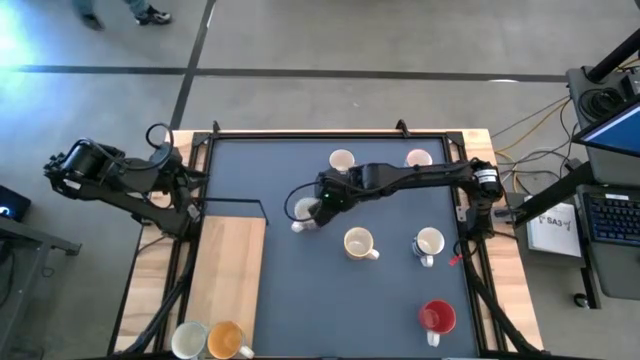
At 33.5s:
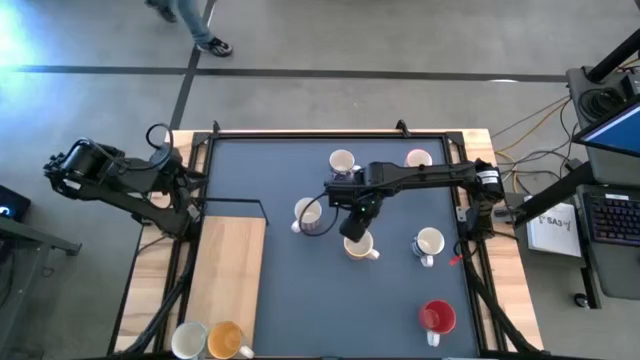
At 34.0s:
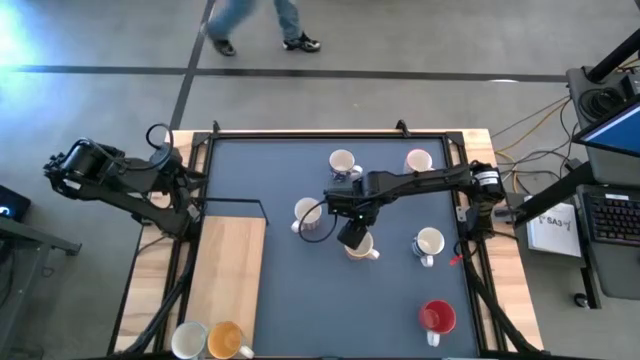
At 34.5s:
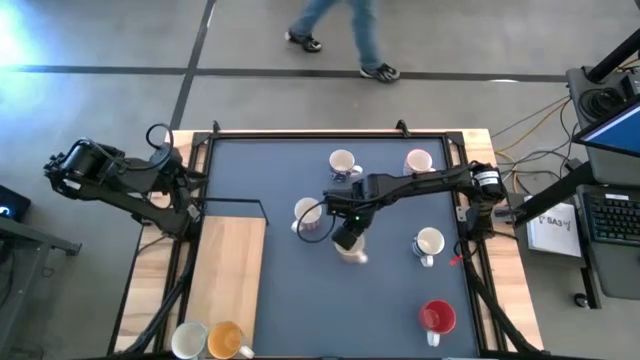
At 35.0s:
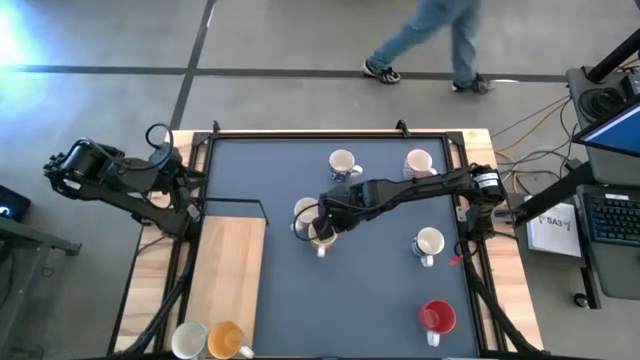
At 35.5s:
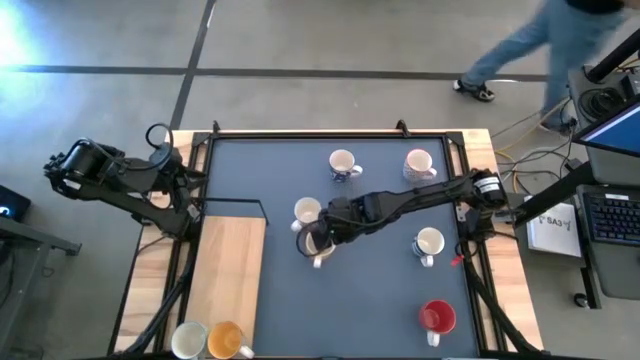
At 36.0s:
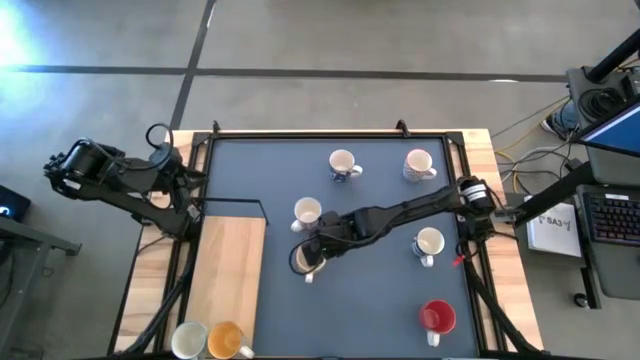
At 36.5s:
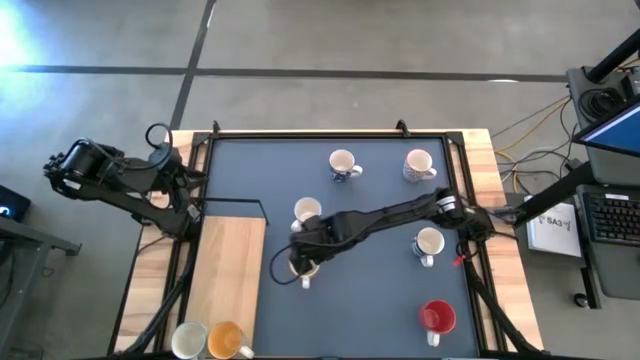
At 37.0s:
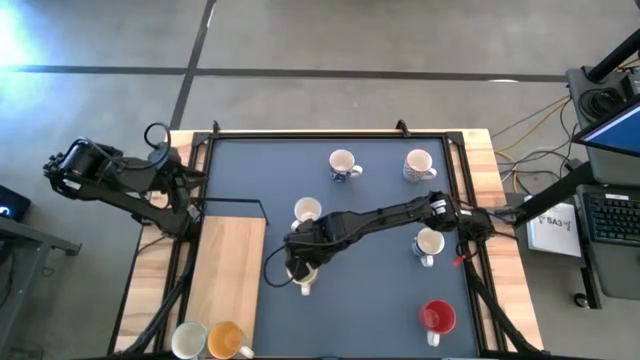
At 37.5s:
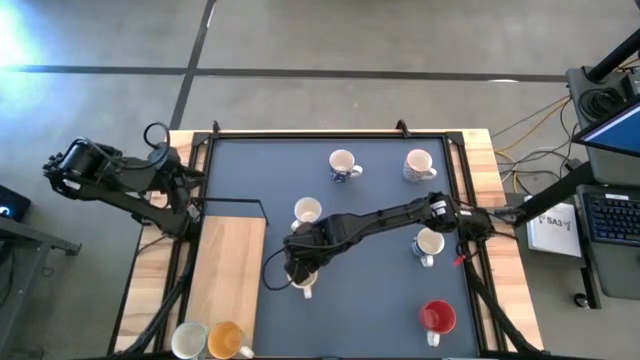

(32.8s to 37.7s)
Task: Place coffee mugs
Adjust the patterned brown mug

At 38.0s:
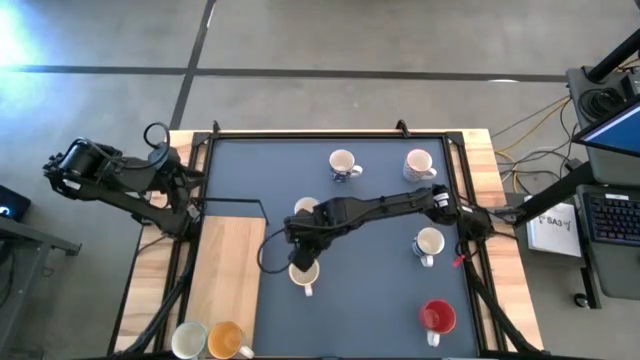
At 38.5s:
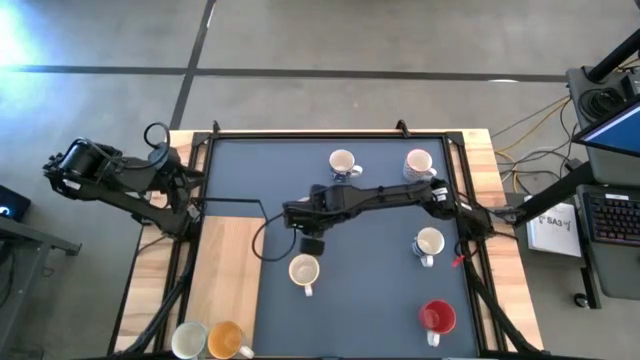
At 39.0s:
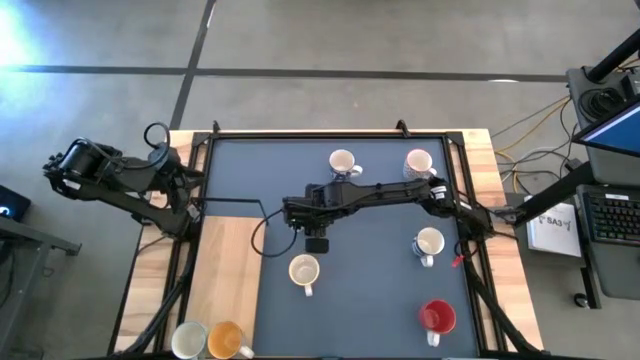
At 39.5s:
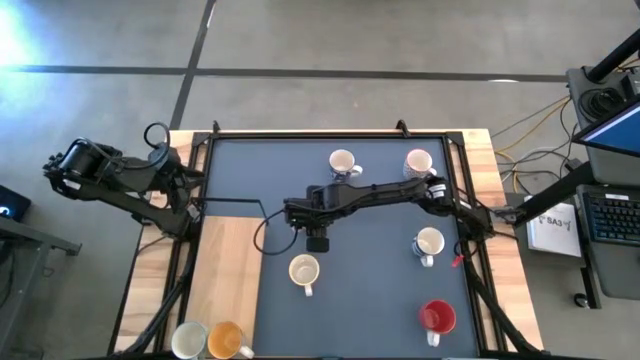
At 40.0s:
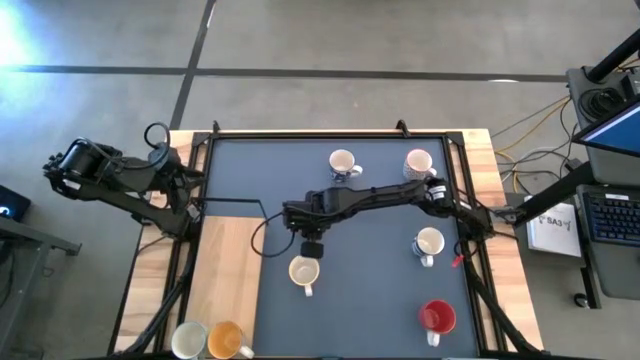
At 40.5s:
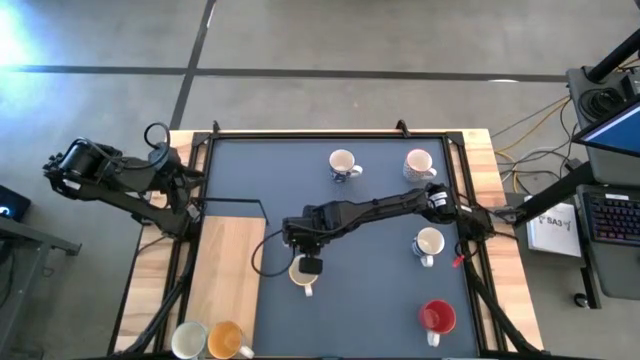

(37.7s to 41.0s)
Adjust the patterned red mug

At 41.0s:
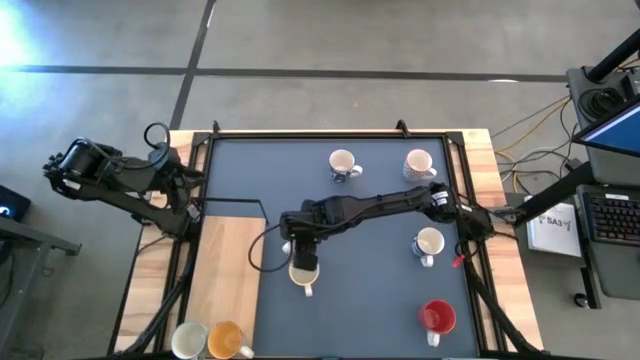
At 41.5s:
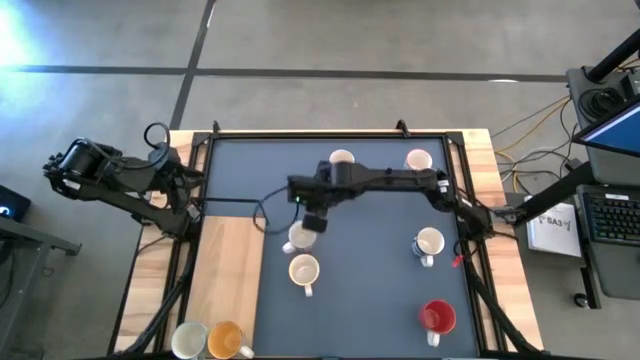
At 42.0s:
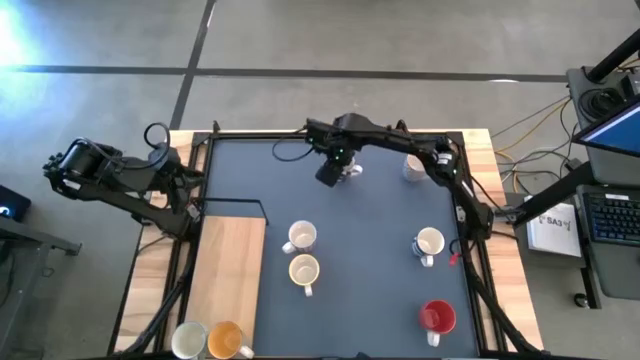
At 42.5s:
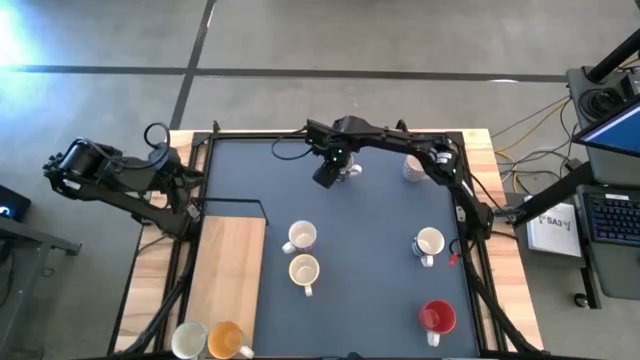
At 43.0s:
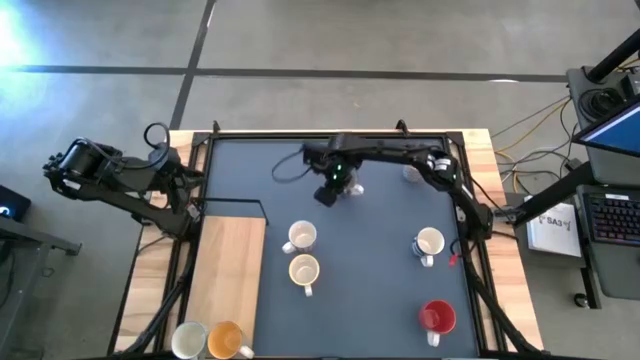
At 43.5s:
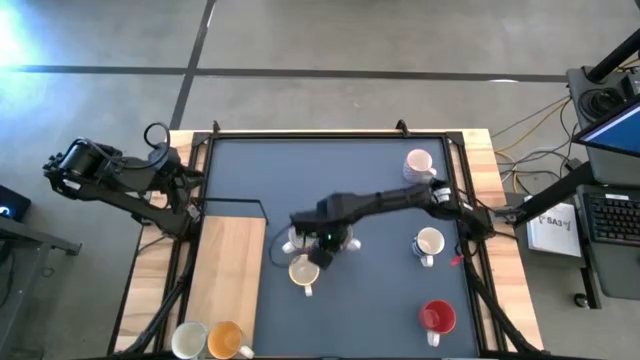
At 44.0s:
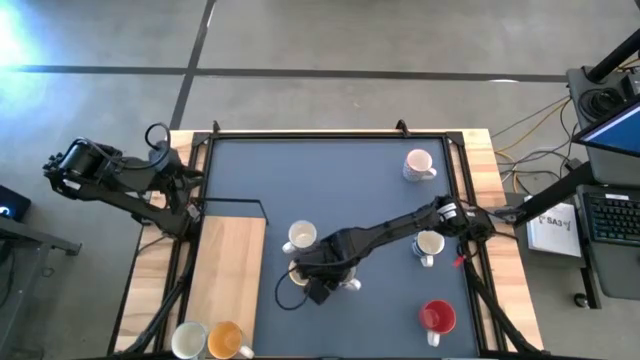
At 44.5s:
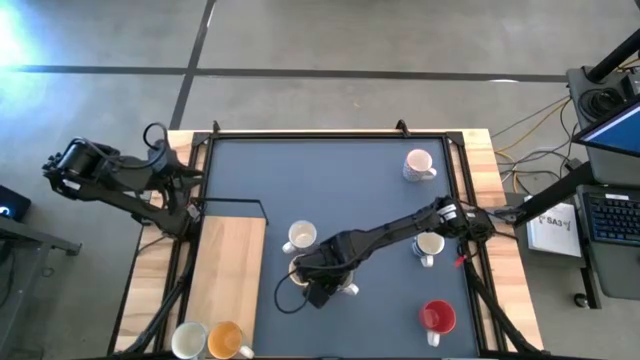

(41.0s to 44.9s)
Move the patterned dark blue mug to the center of the table

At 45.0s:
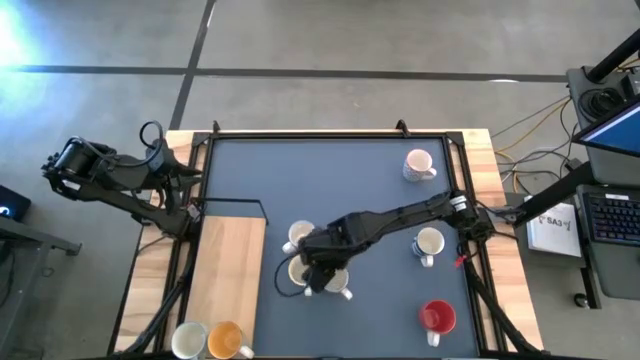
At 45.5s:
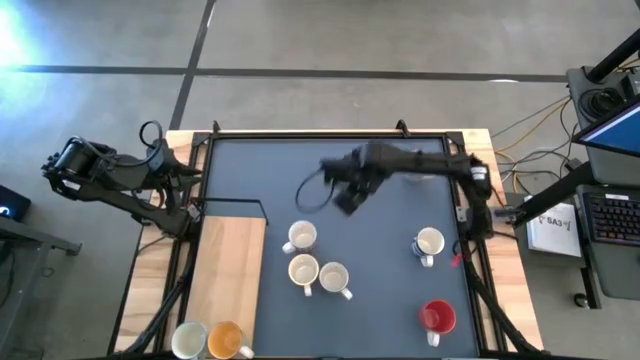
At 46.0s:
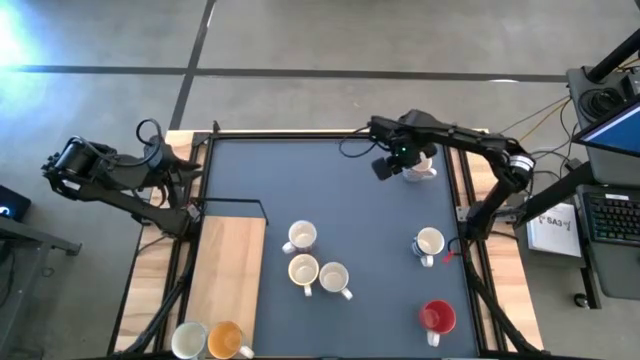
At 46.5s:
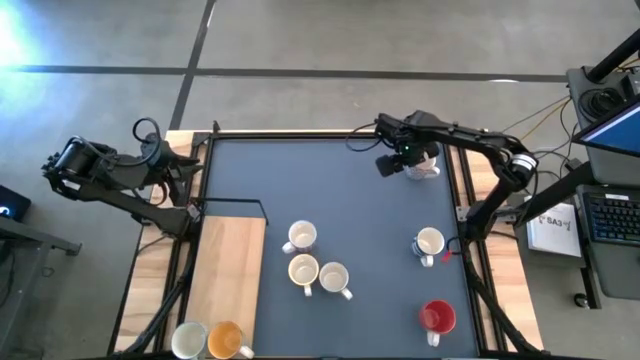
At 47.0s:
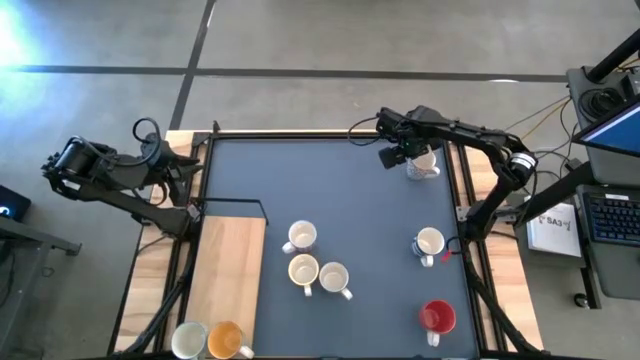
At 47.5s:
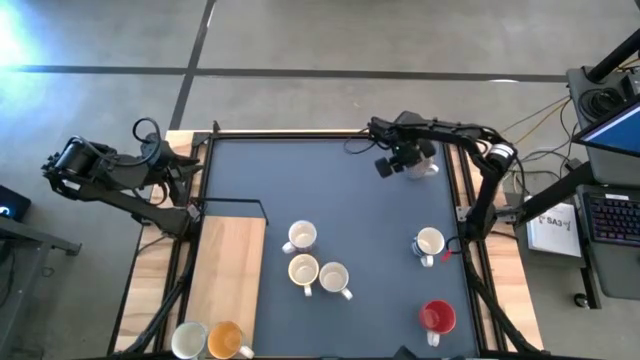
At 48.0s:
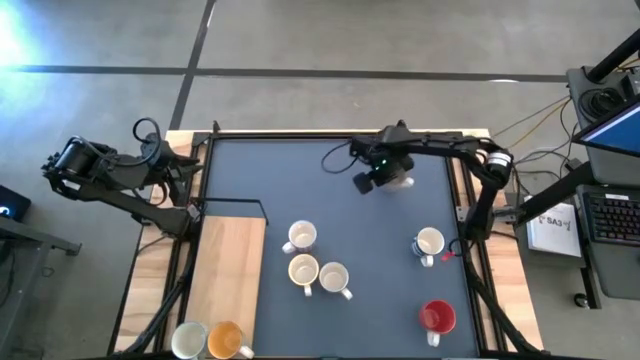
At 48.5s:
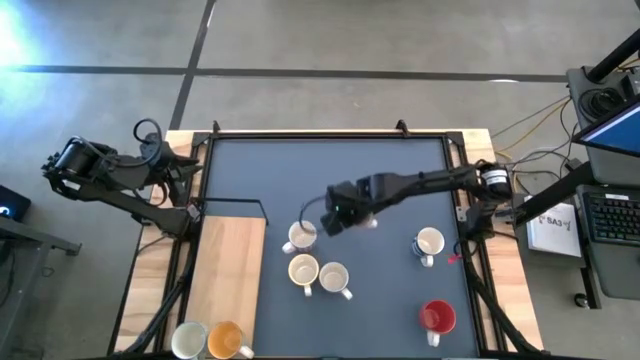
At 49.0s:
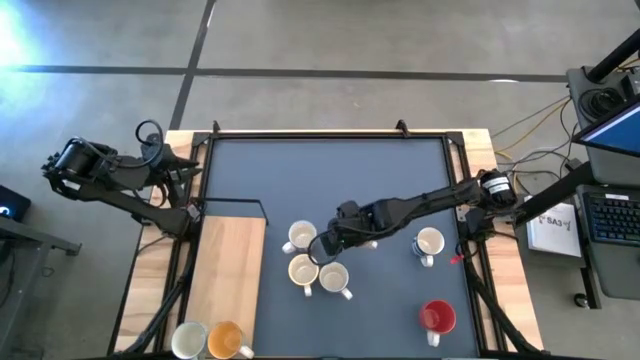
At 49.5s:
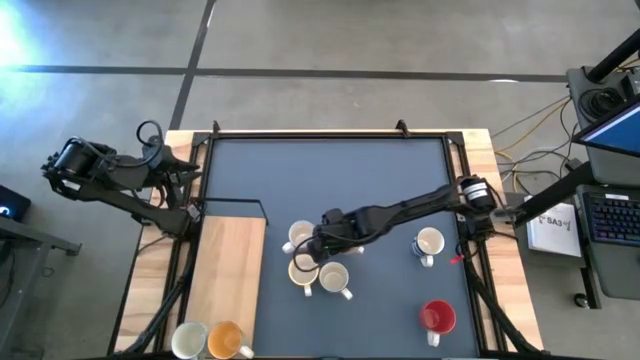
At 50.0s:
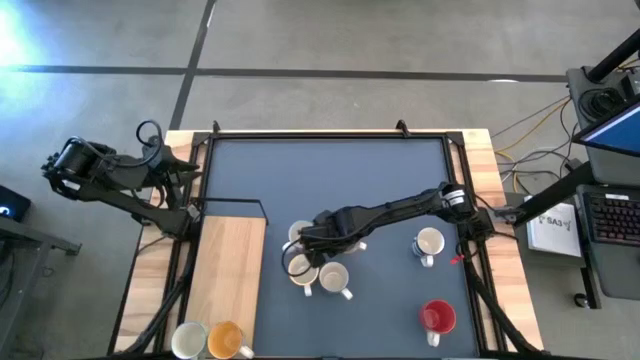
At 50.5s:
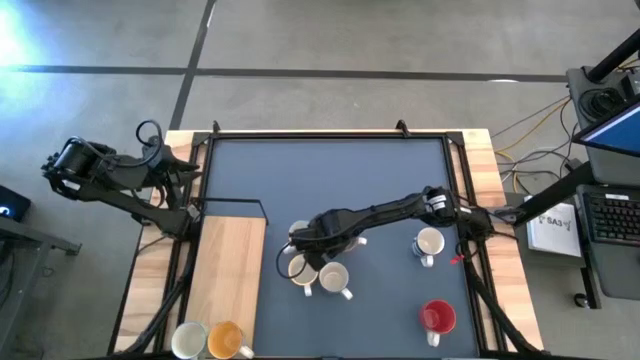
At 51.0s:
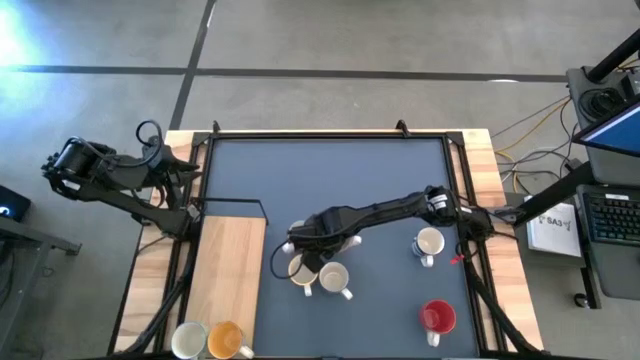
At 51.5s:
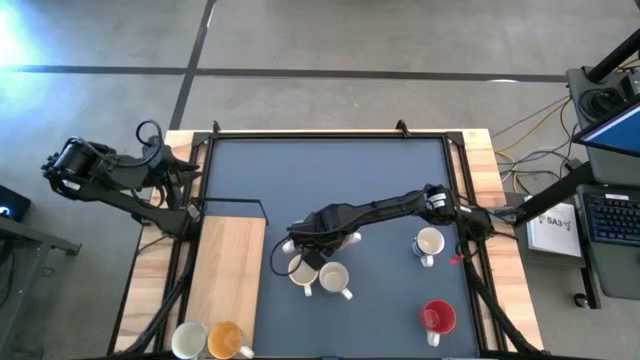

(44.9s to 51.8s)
Move the patterned gray mug to the center of the table

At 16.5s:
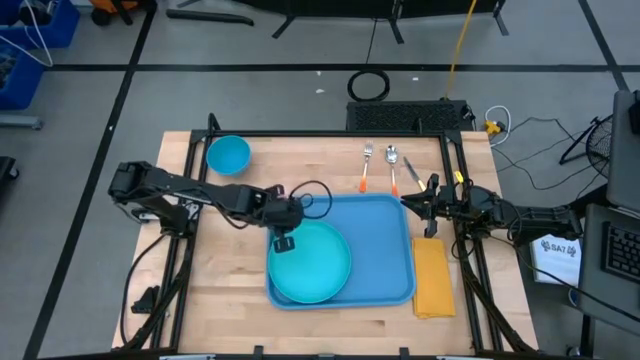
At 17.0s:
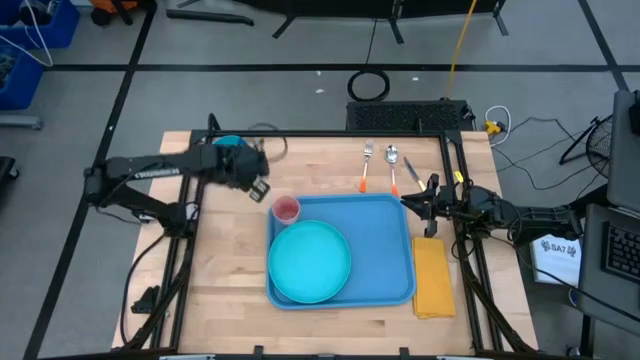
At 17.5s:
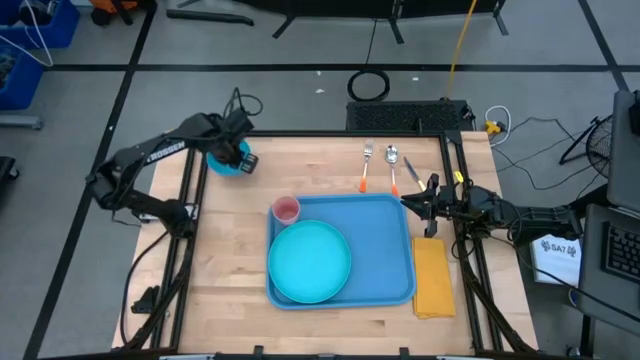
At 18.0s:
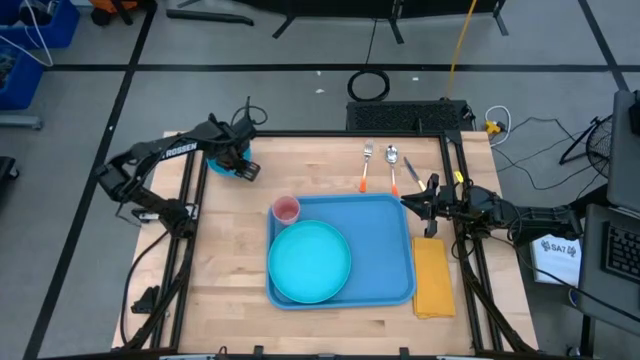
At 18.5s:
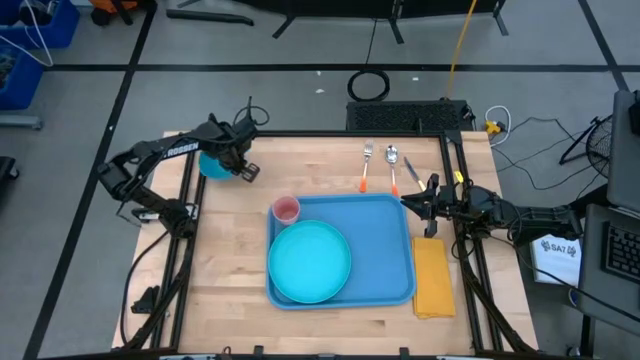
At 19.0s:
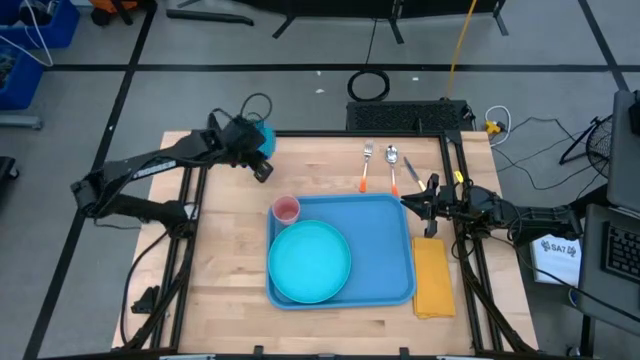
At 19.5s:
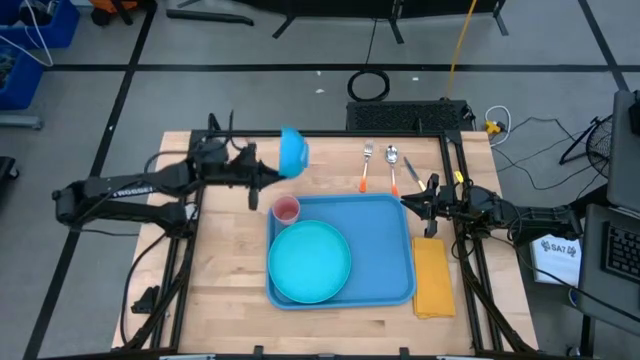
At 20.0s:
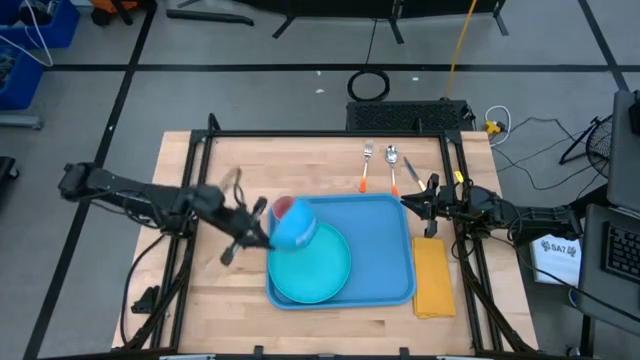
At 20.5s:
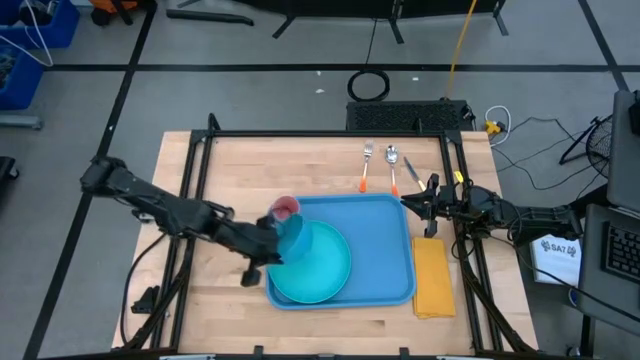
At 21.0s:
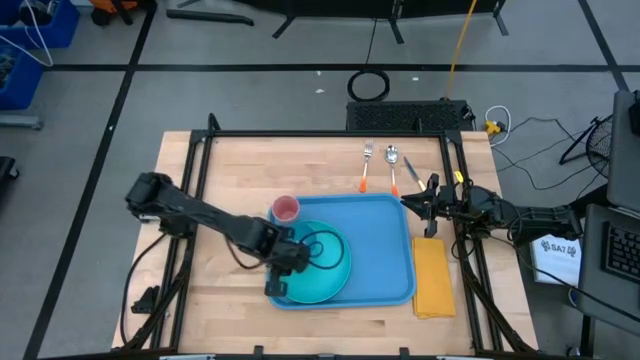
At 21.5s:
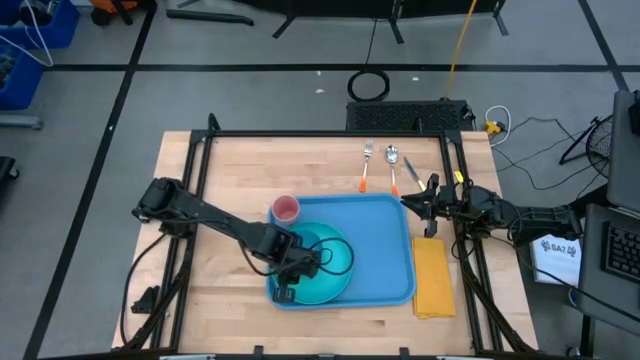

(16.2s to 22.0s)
Task: Set up tray
Put the blue bowl on the light blue plate
